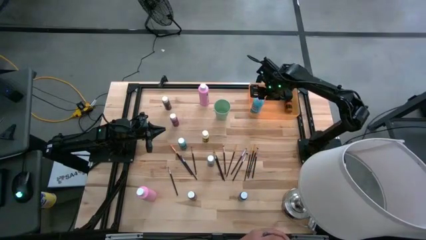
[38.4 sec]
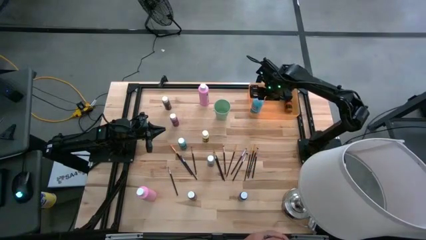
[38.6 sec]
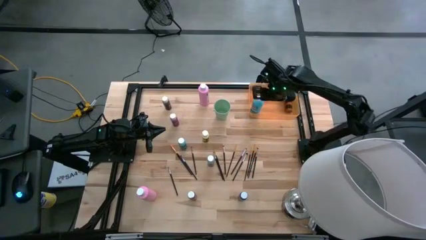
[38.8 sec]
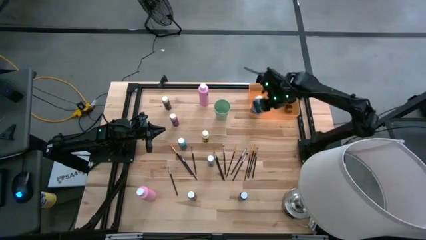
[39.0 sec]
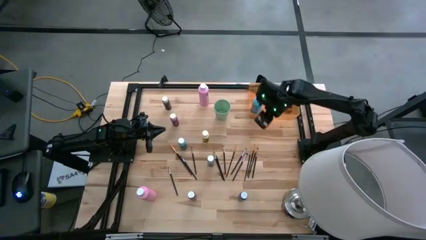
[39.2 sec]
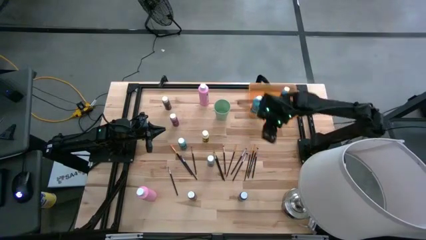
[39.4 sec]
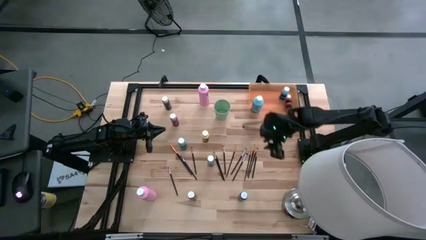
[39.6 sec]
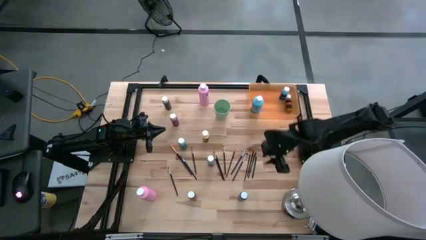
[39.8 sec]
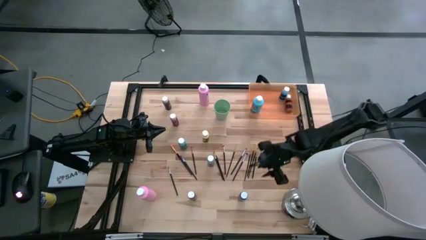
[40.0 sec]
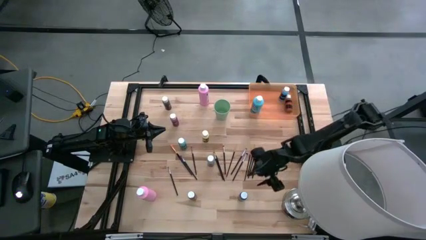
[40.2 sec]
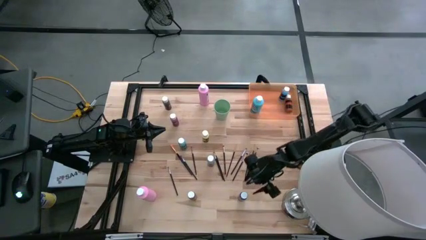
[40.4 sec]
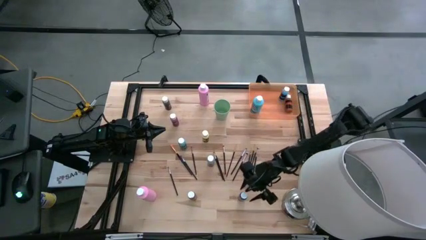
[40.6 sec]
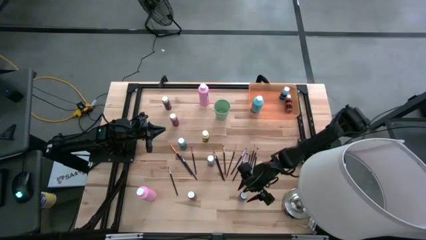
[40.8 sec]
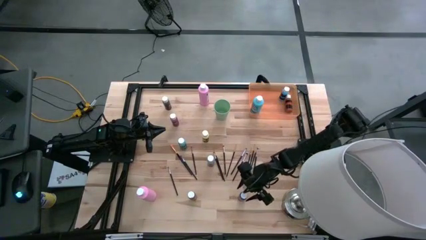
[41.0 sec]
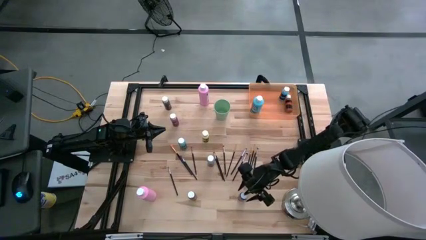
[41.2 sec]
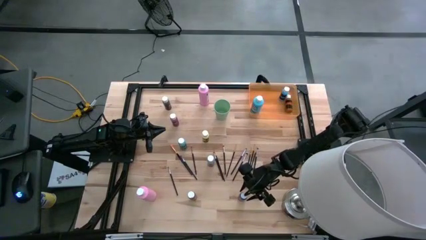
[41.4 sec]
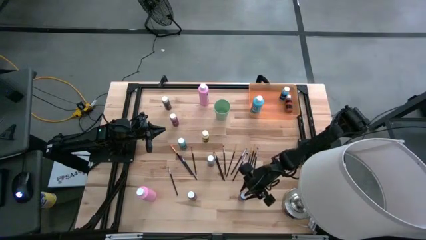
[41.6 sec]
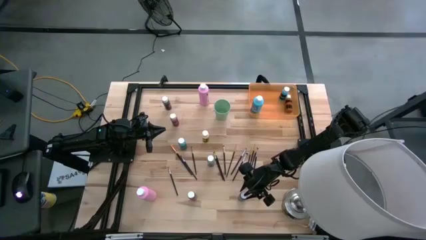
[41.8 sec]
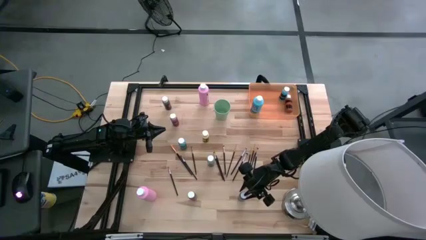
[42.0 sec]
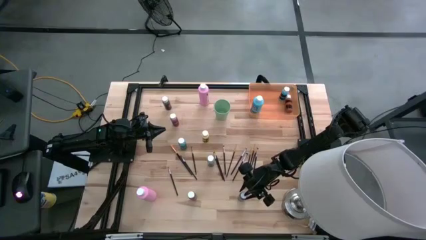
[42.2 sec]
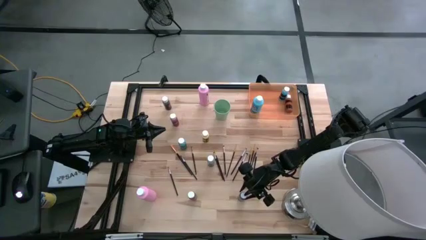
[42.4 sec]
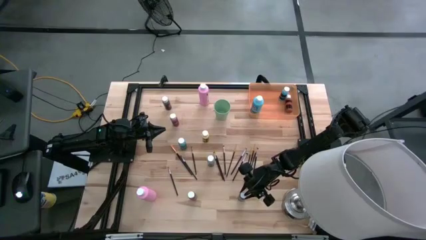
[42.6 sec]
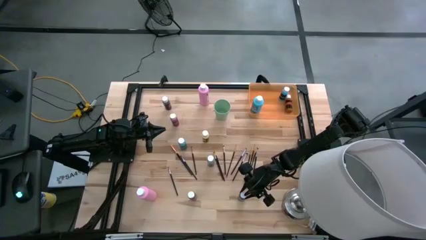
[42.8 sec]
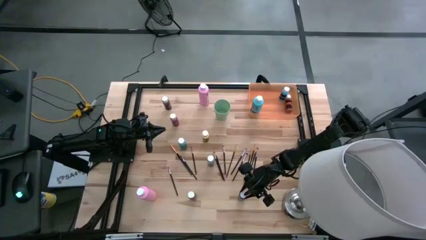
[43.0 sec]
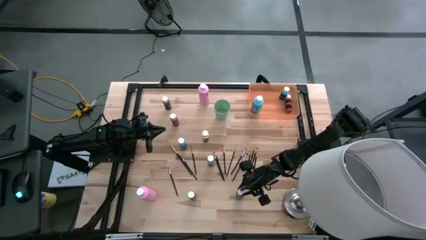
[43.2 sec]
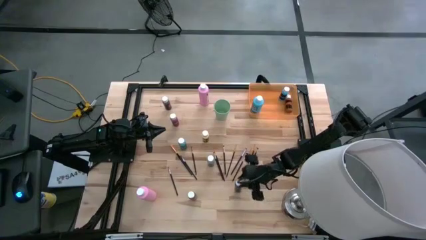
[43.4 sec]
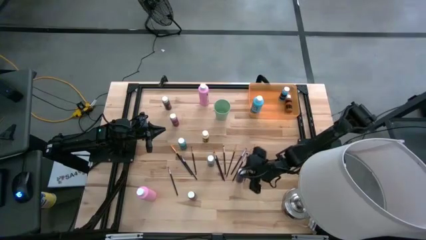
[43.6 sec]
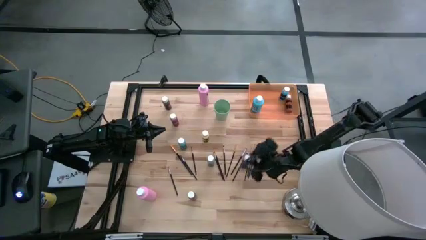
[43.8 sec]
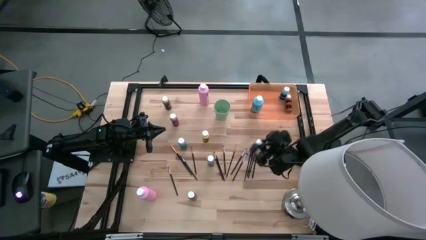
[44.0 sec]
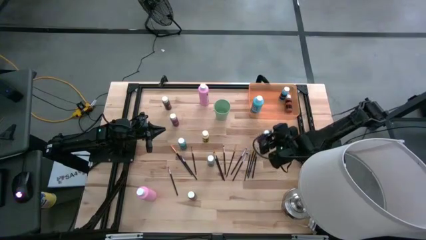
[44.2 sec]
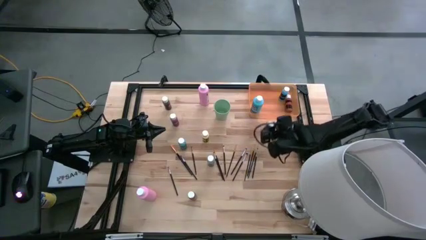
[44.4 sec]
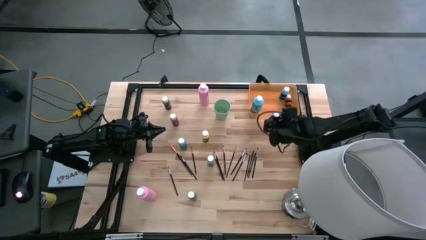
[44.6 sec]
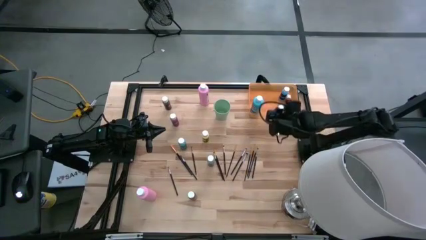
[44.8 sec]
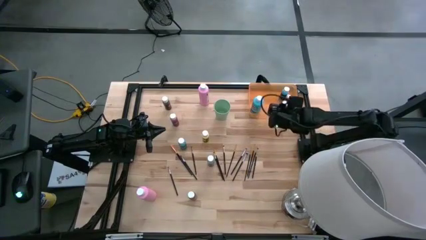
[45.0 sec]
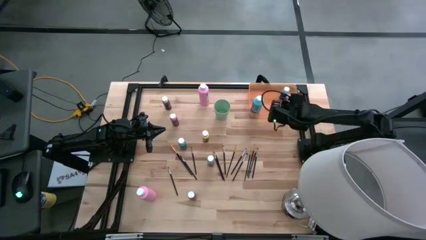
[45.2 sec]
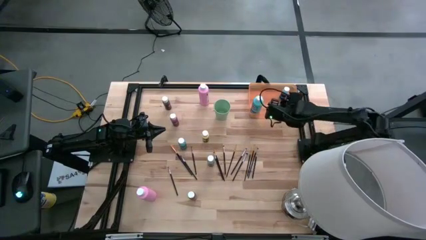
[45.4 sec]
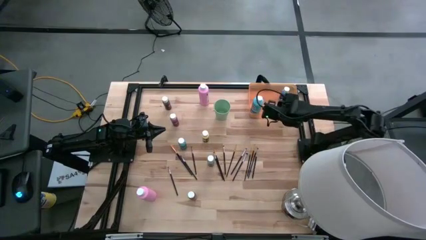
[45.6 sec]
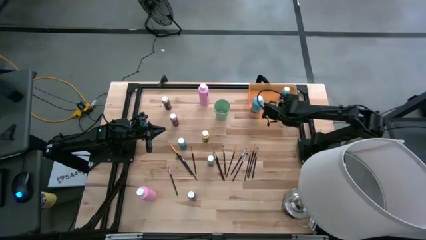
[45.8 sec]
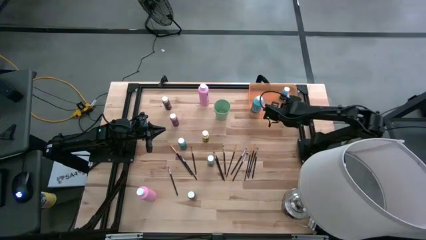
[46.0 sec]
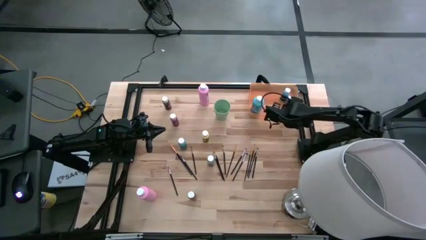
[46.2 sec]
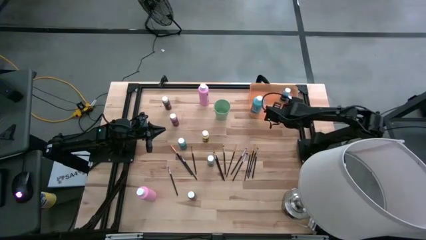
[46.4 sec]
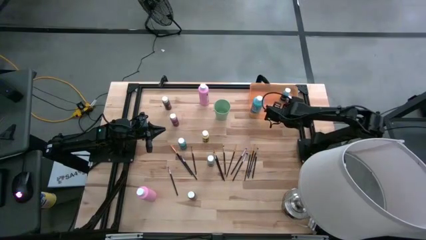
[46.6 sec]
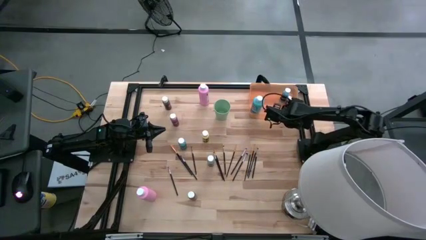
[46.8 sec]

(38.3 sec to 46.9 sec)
Task: Pick & Place Paint Supplies
Put the small dark blue paint bottle into the orange bin

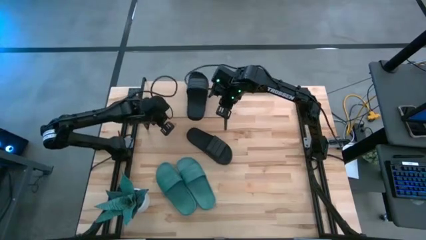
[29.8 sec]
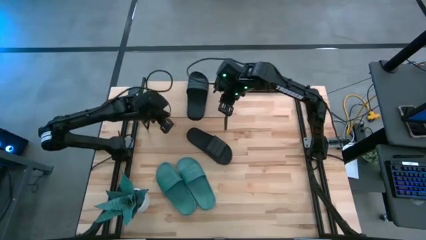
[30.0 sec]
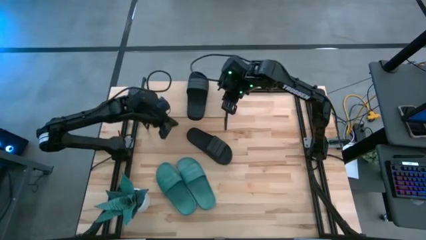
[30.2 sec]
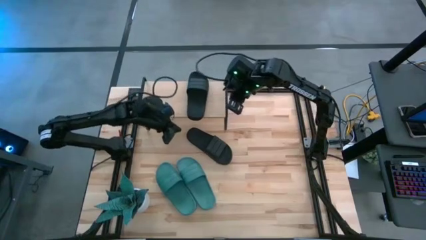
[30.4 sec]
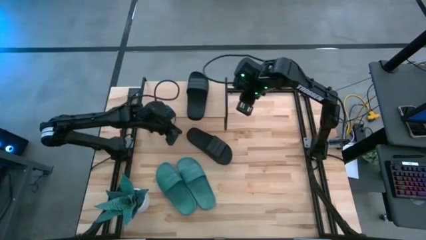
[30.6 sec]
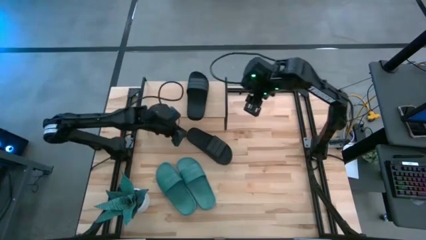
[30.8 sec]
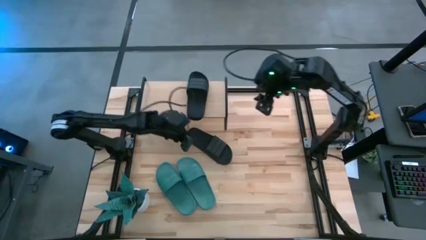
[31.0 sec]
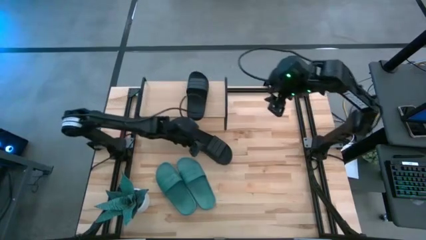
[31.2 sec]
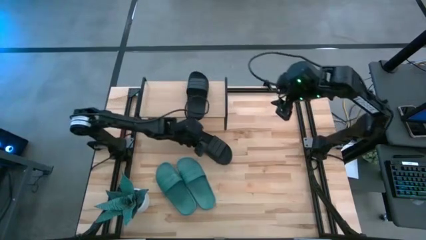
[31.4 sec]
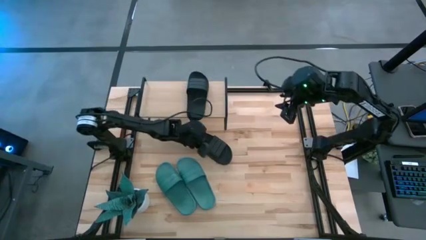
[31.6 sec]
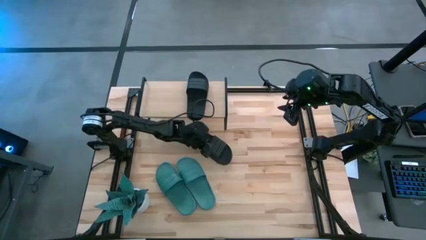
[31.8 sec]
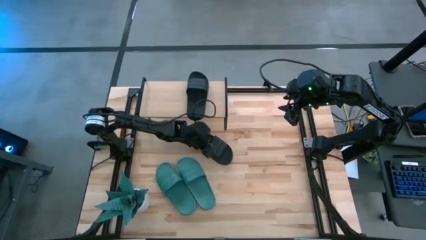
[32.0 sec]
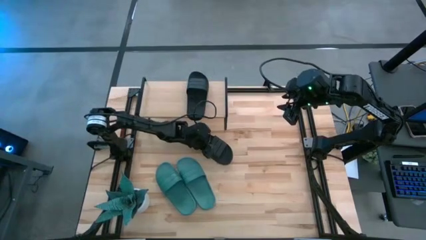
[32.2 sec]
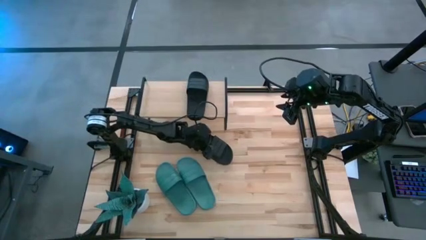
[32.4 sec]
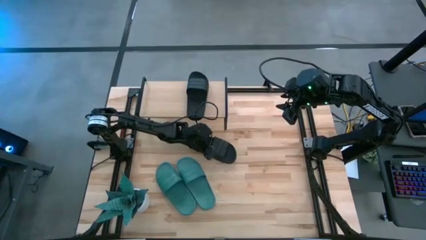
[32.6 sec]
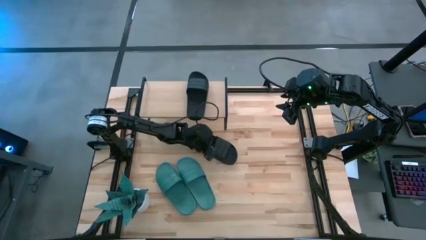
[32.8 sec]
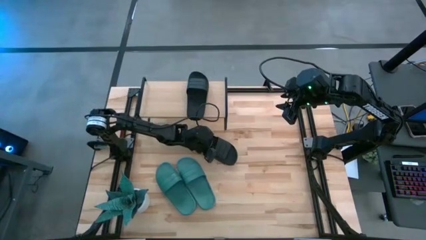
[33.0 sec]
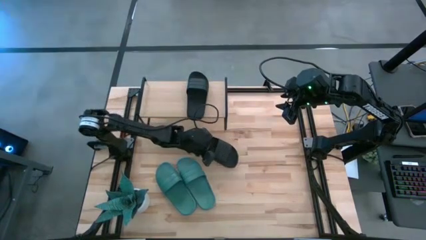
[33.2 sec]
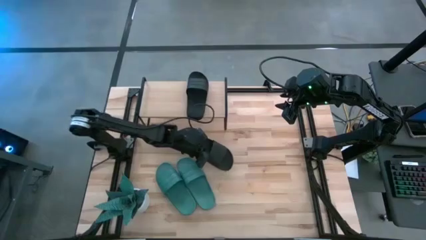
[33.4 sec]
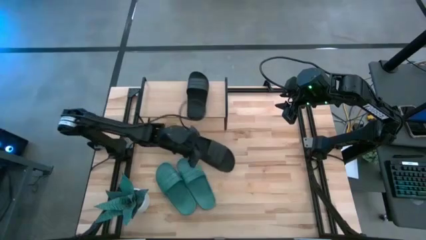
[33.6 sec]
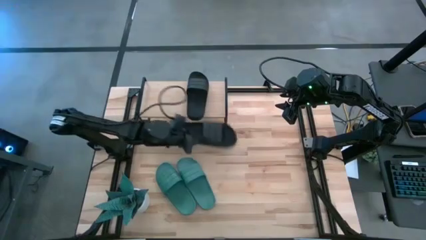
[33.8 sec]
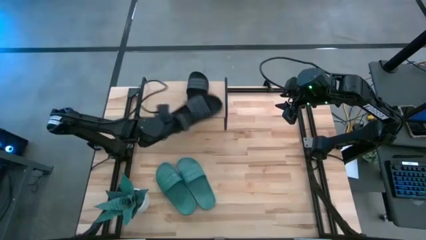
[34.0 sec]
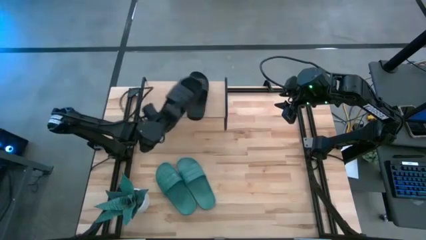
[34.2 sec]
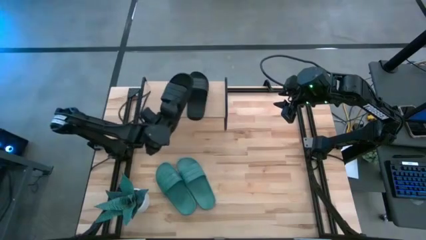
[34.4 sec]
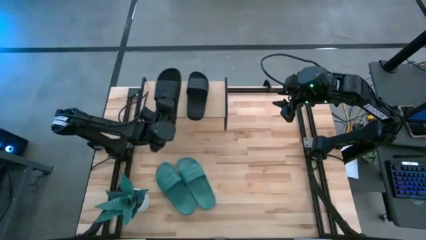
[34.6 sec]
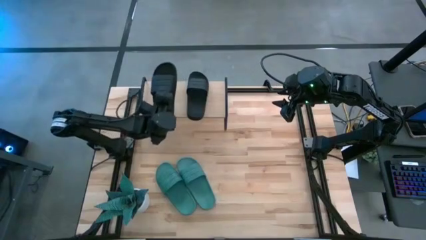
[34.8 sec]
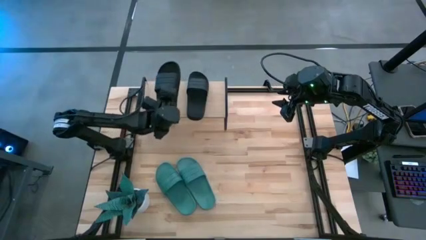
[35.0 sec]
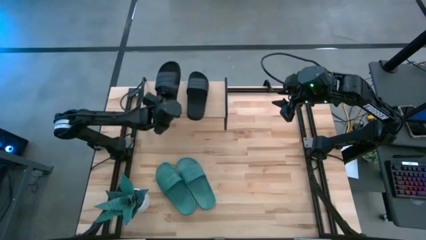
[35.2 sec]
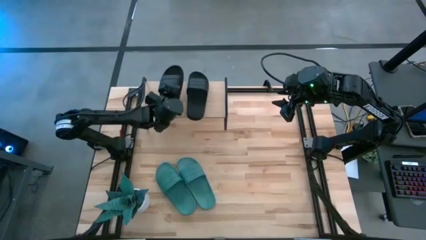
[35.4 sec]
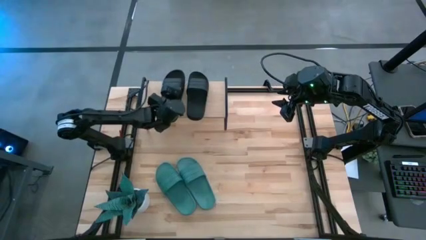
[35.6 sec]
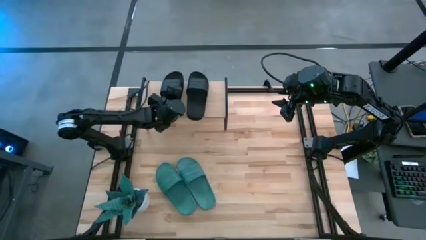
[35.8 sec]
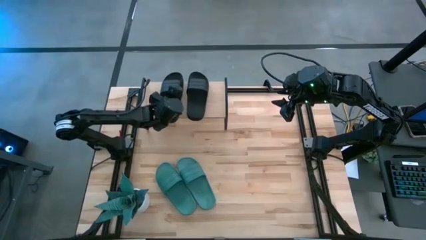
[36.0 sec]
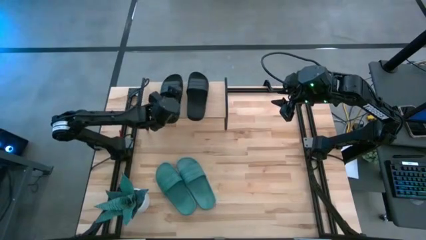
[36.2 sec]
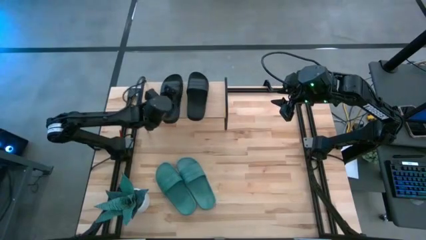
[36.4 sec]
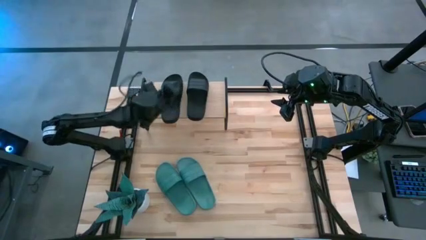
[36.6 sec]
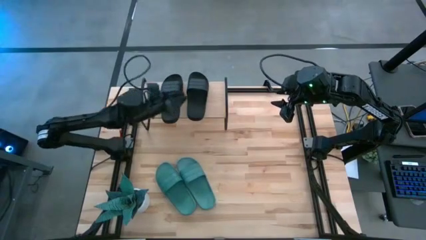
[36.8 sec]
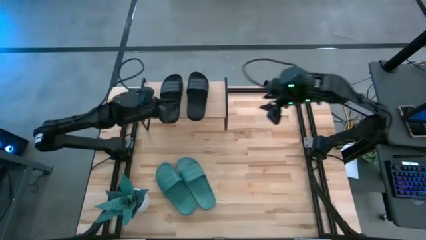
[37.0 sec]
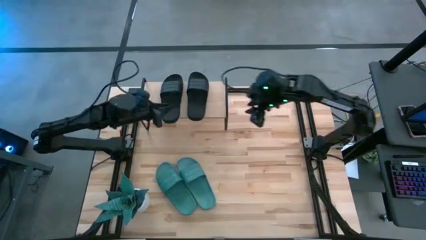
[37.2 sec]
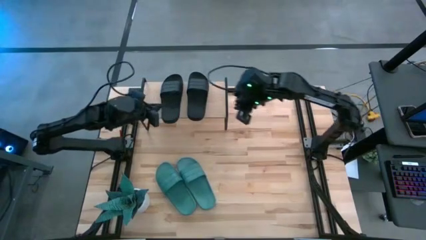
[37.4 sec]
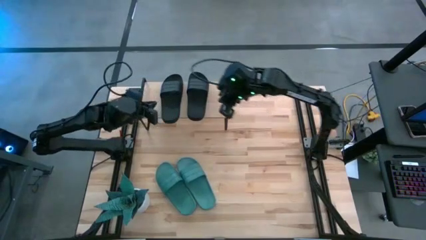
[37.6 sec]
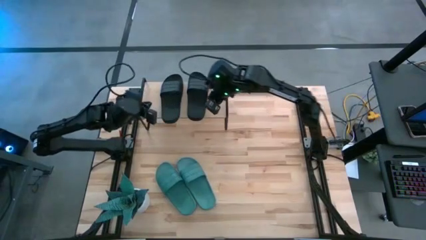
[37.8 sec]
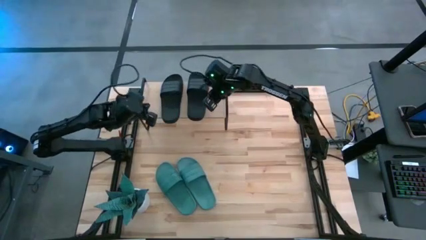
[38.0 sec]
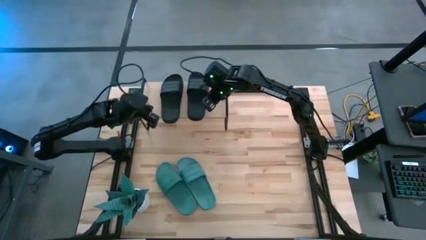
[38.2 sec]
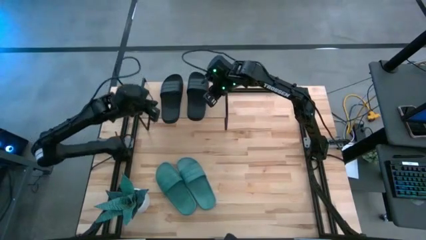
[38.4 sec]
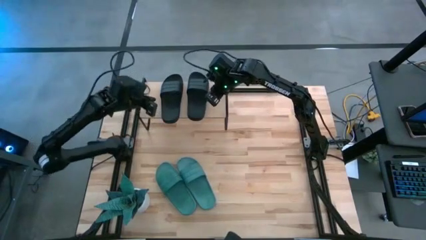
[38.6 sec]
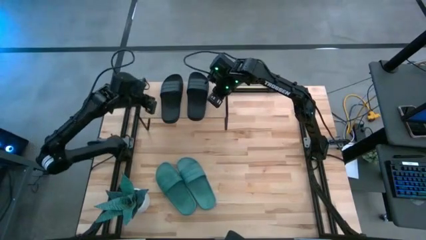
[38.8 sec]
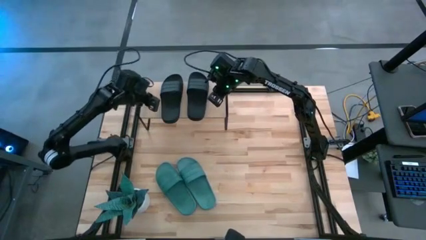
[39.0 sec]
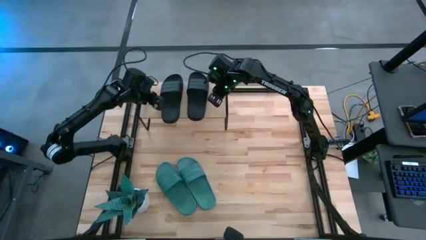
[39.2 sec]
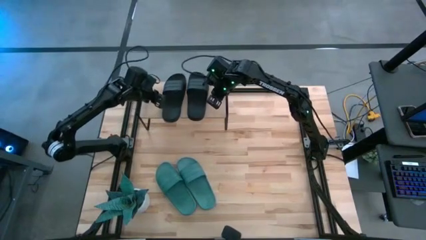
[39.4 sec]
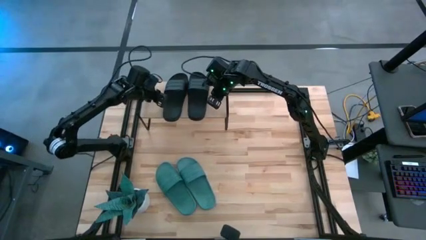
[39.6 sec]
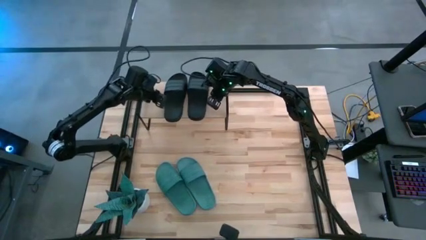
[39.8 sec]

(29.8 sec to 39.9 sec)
Task: Pick and place slides into the shelf
Put the black slide on the shelf
